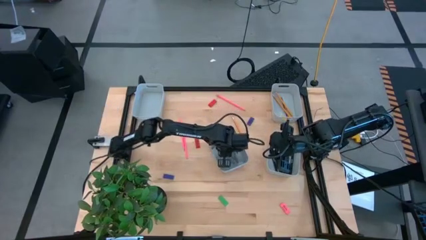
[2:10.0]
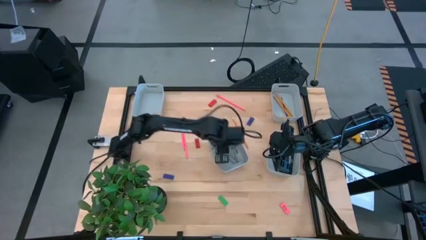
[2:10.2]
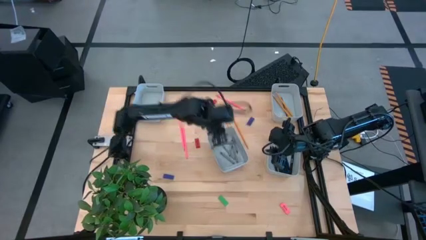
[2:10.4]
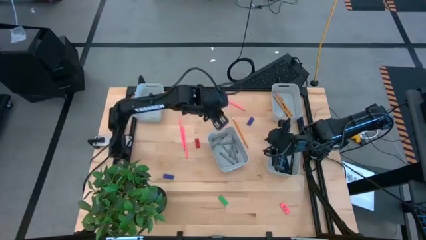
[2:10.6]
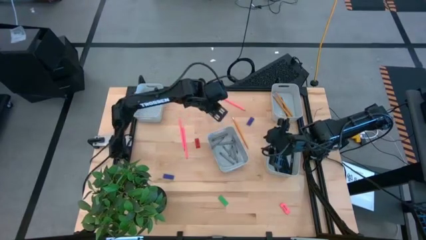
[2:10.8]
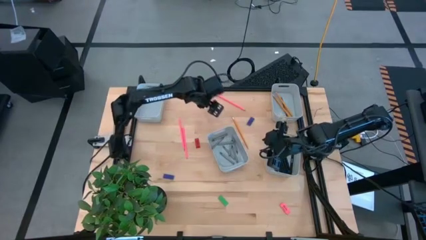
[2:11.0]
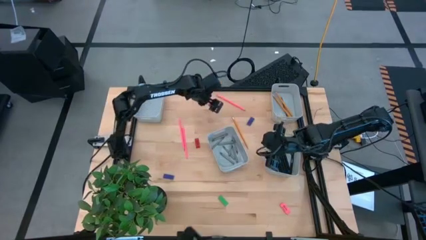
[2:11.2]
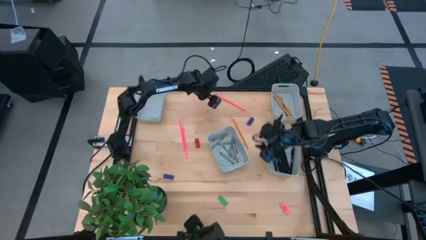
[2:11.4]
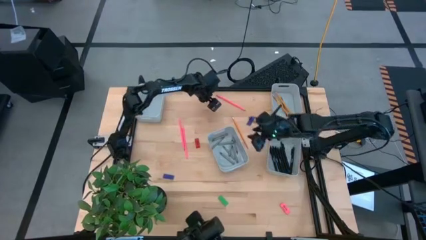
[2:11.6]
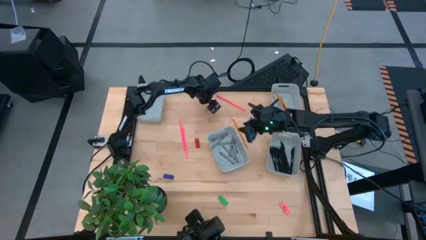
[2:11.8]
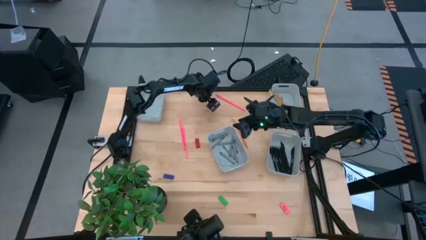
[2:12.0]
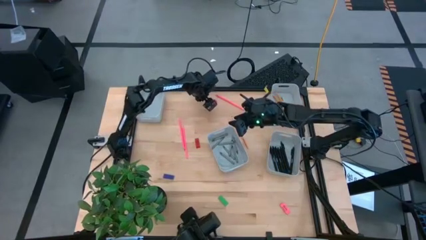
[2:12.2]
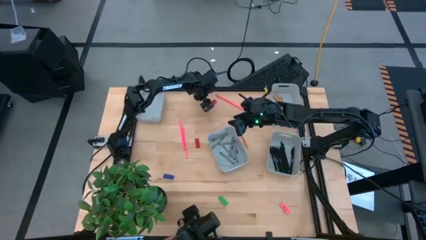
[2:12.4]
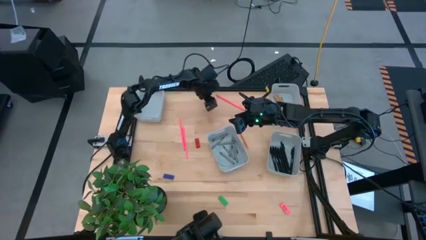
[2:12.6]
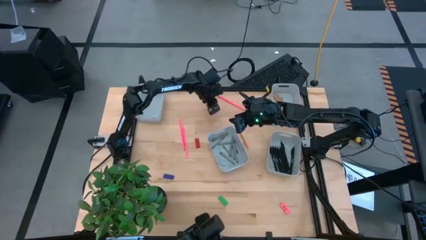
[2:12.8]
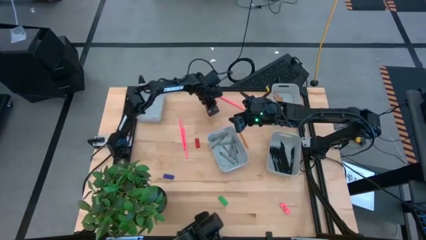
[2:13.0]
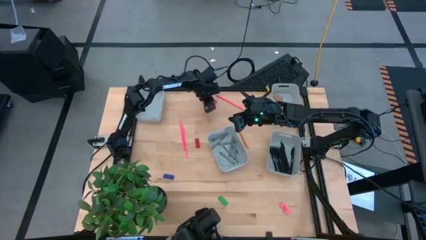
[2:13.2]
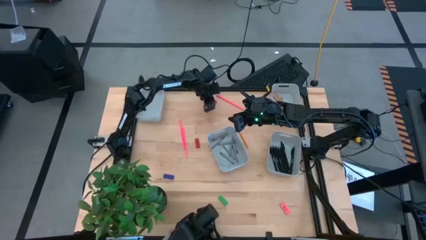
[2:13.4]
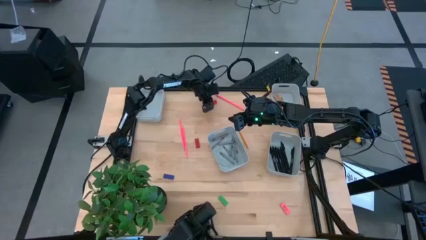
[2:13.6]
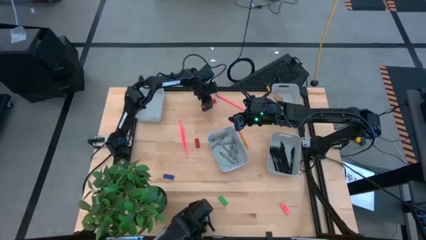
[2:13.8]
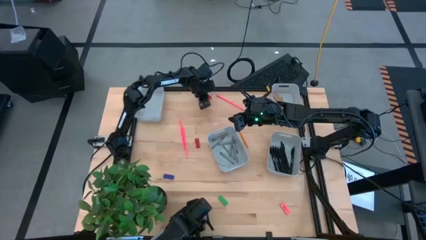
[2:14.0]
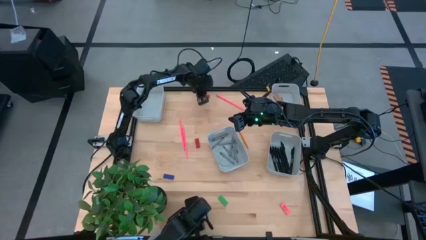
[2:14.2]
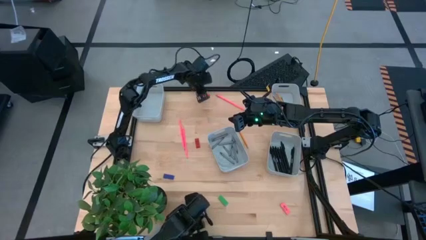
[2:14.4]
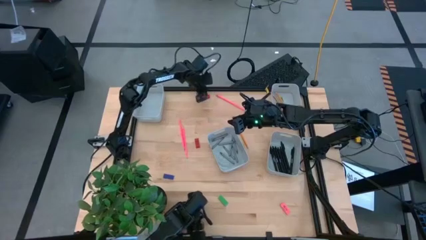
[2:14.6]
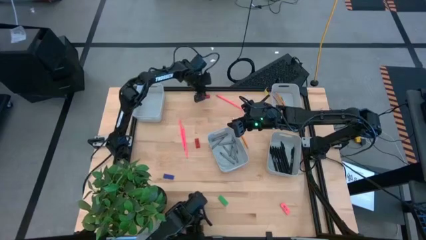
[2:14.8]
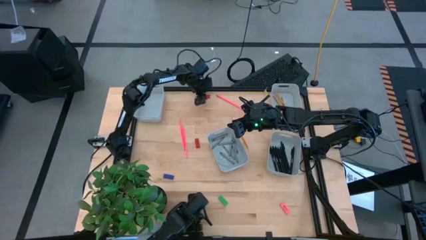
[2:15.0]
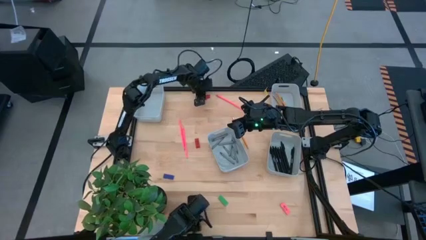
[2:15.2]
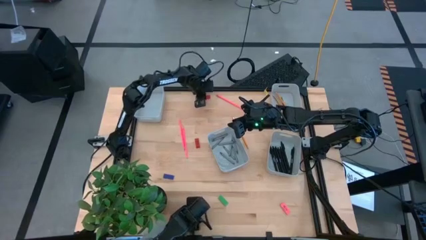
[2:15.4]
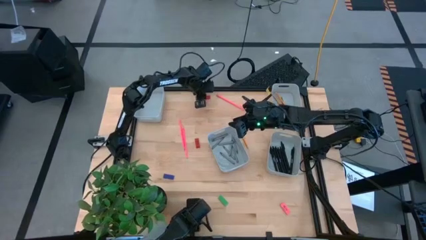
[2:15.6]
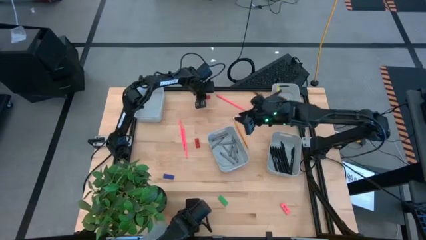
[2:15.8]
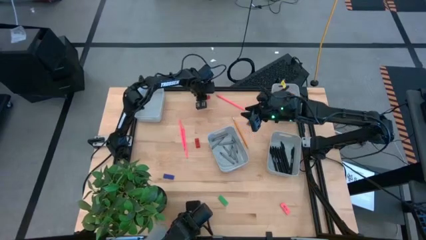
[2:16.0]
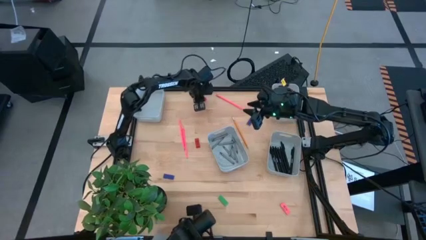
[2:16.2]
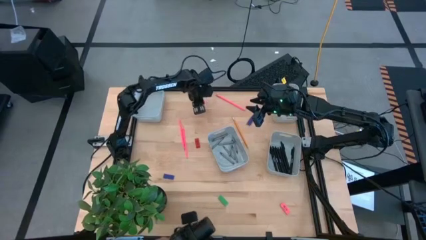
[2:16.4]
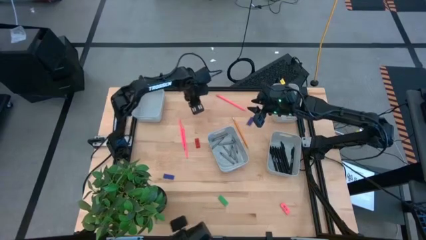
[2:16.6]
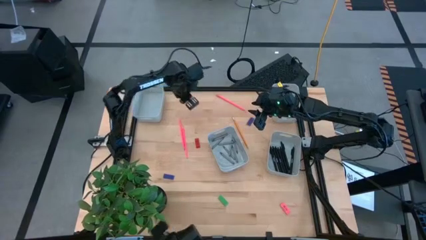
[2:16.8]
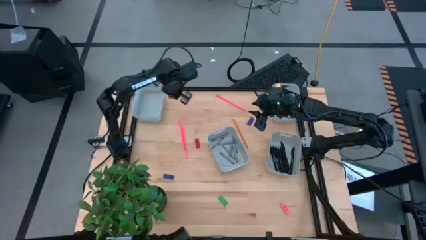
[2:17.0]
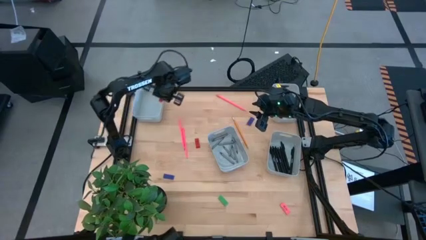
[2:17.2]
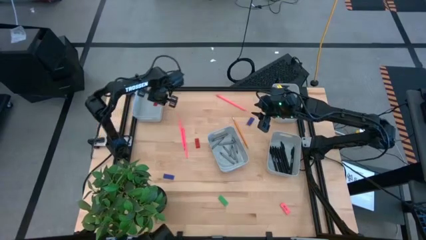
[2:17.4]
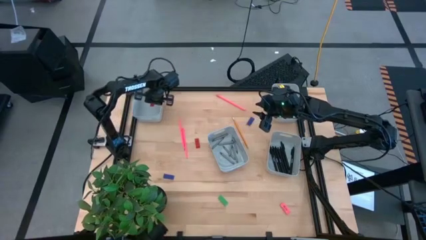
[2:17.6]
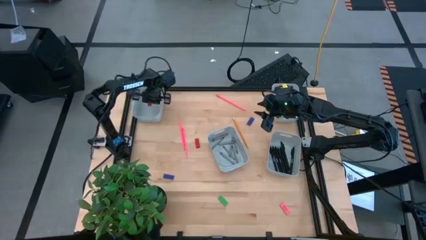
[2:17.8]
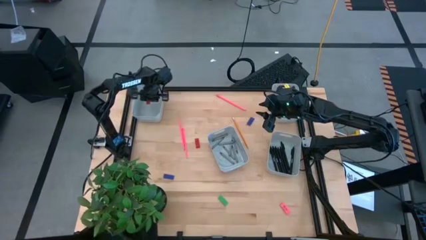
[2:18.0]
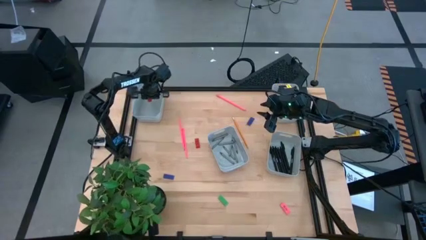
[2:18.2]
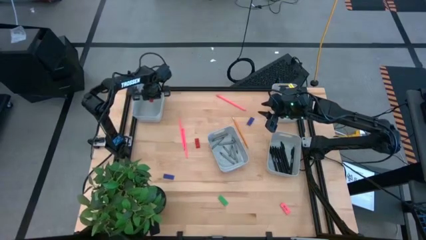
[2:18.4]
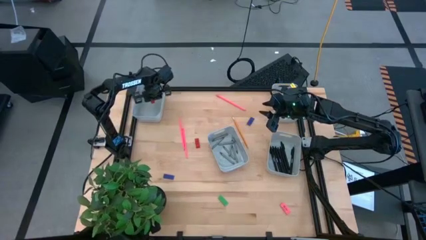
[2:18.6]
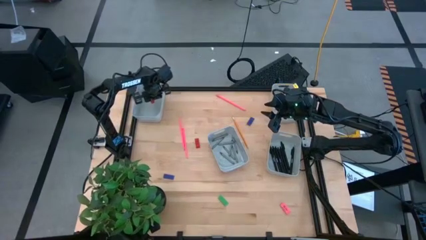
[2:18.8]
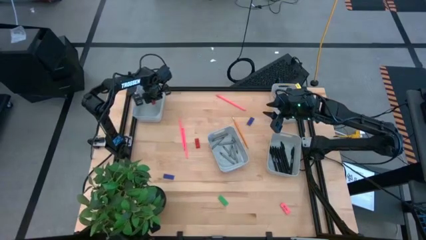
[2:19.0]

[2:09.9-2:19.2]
Task: Sort crayons/erasers/pens/pencils in bins
Put the red eraser into the top left gray bin

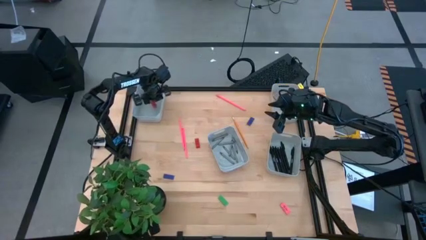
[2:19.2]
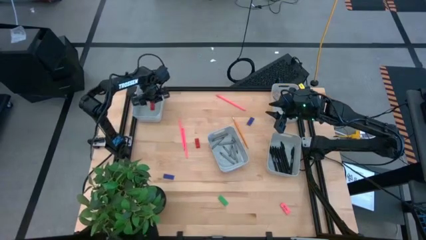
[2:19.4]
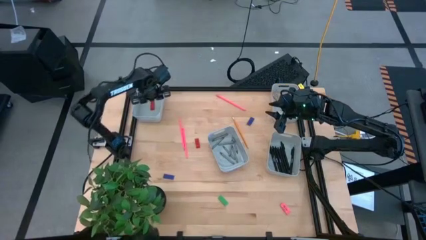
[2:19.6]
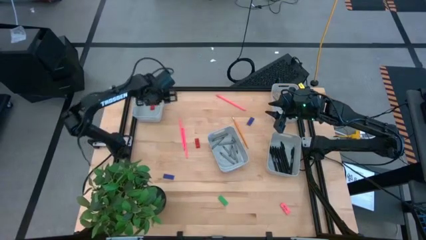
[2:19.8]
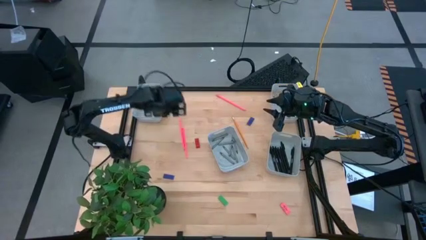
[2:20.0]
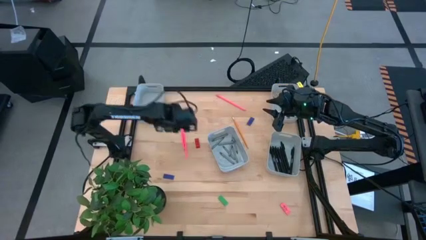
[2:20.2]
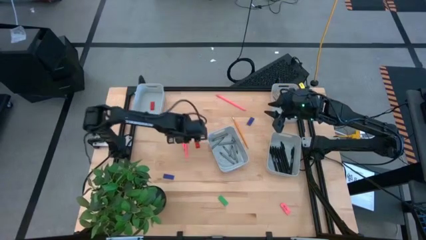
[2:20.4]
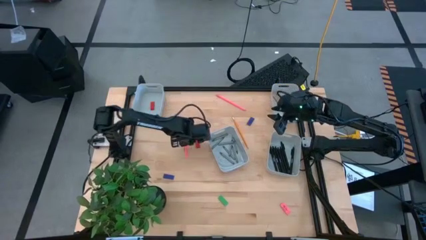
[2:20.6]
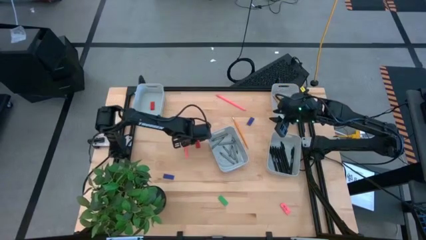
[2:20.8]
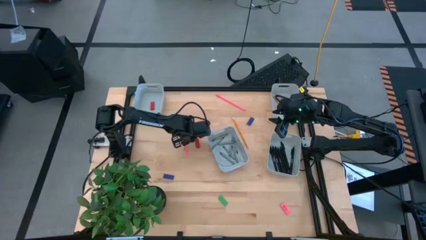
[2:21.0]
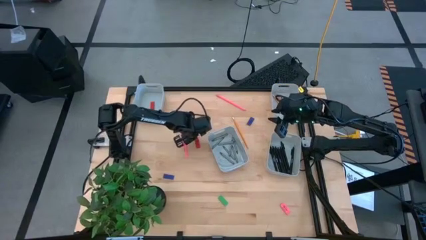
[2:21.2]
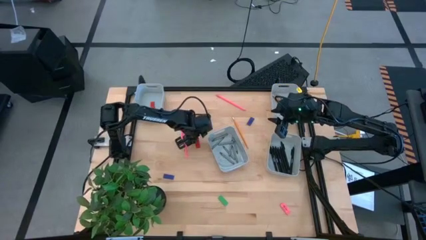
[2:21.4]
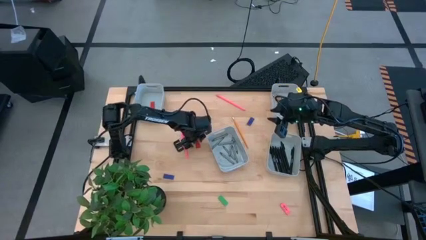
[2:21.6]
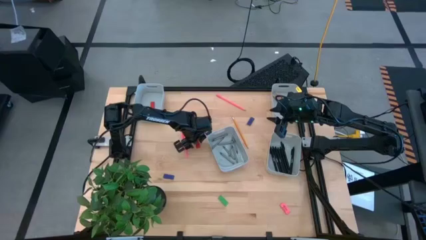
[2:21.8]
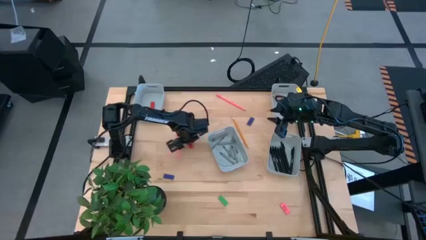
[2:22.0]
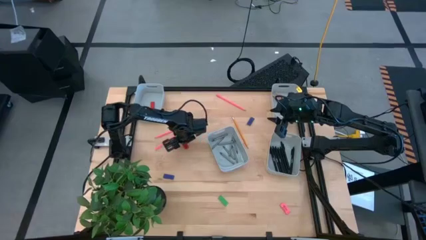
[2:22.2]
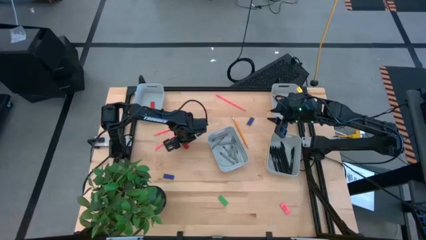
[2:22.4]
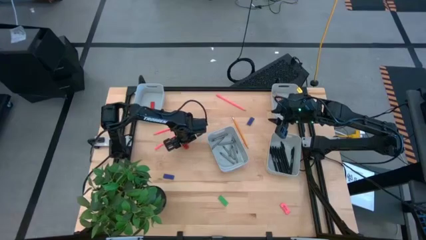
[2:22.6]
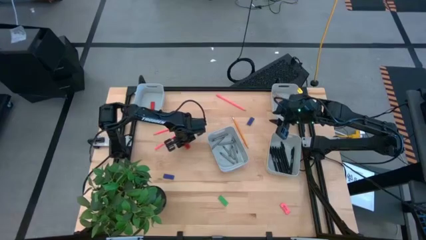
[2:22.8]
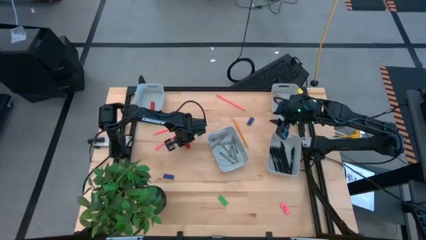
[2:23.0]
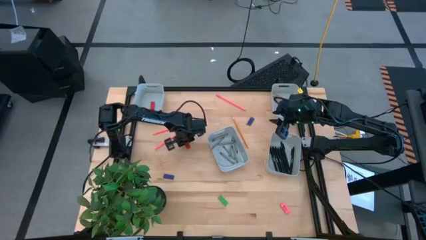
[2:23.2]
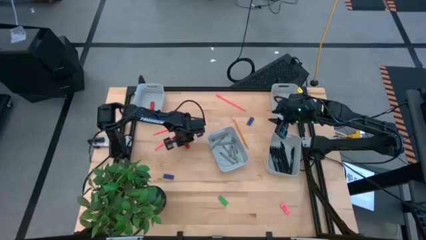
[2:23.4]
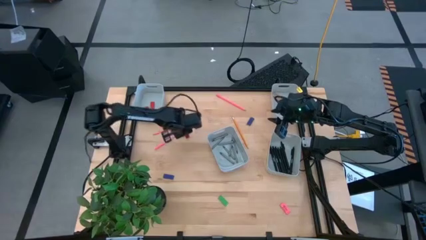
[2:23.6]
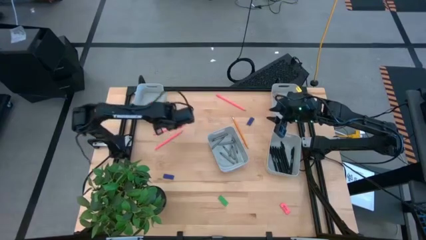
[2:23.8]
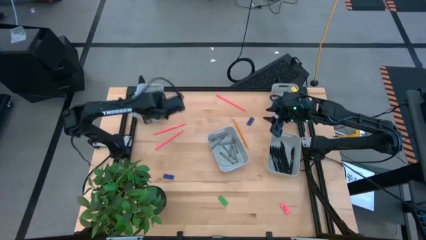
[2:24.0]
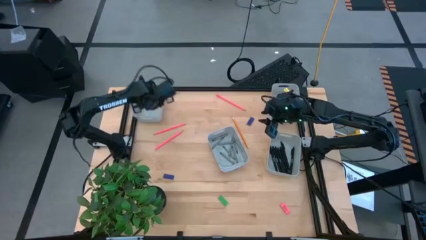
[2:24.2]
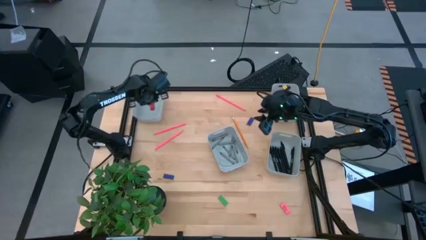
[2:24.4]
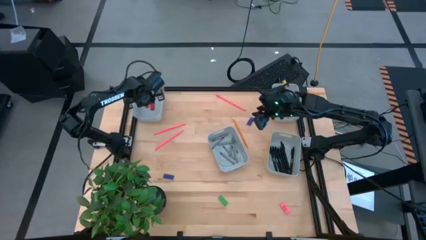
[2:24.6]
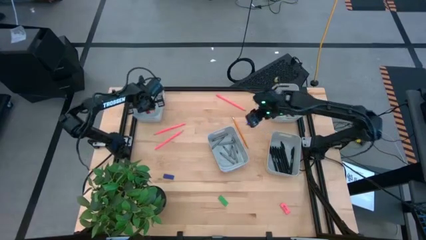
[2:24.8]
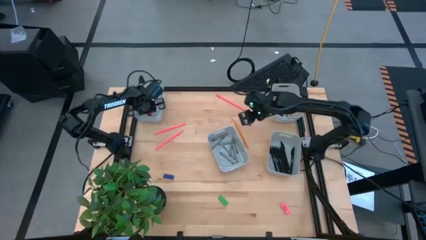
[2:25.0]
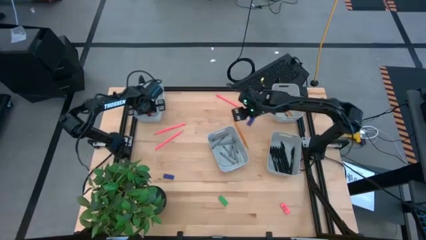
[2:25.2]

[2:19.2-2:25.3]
Put the red eraser into the top left gray bin
